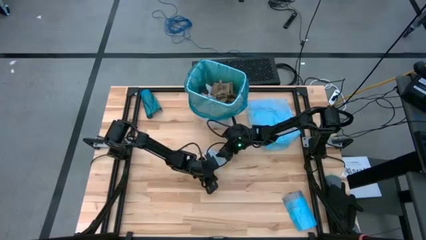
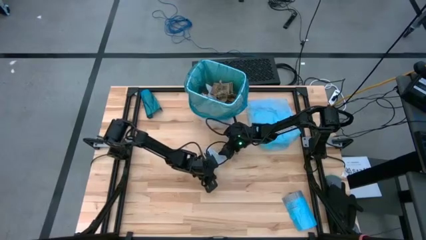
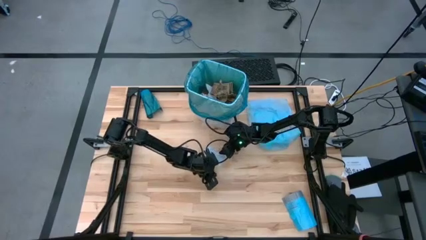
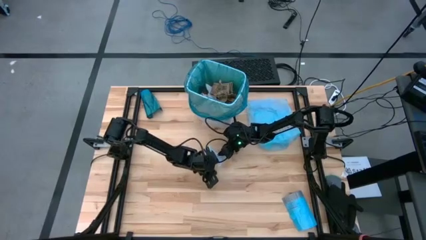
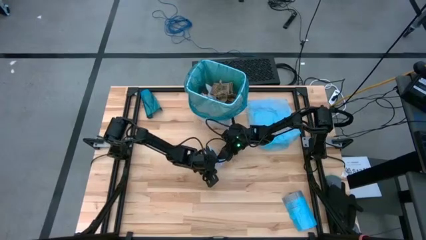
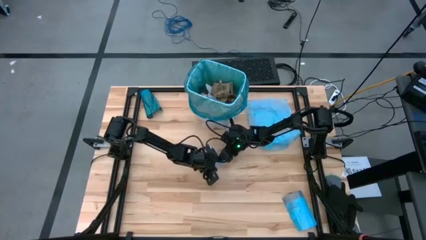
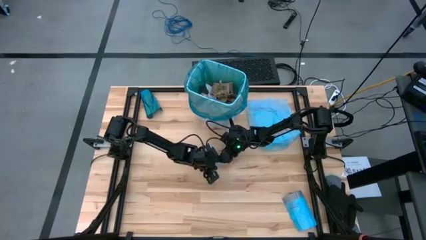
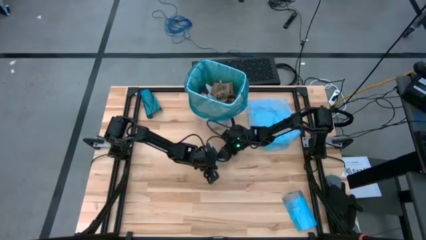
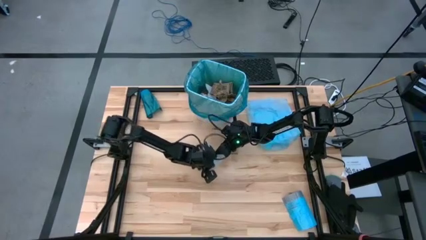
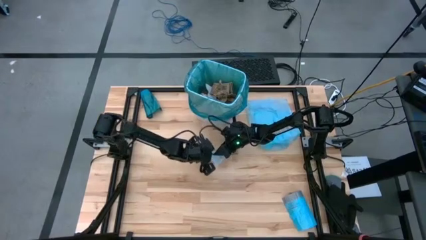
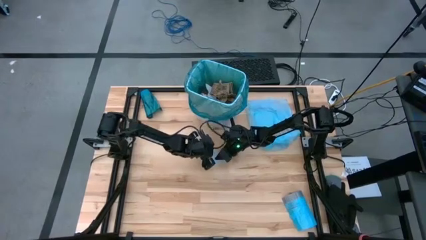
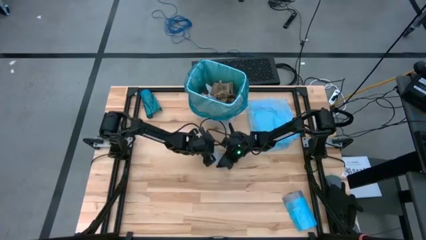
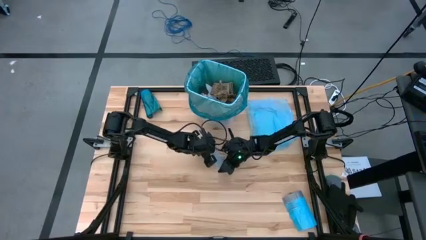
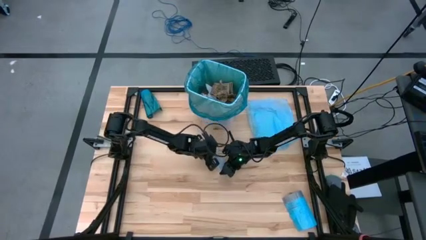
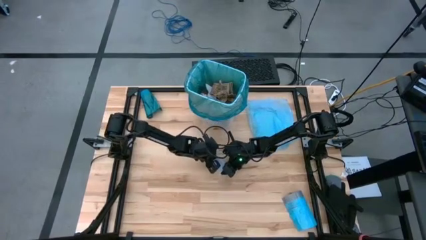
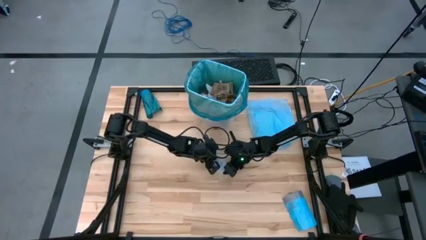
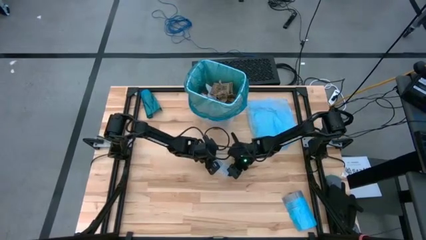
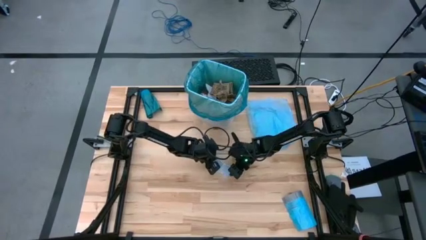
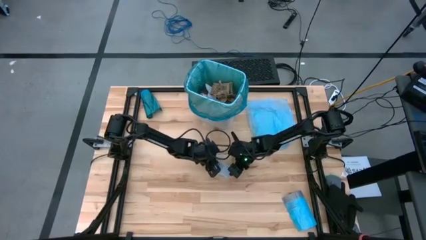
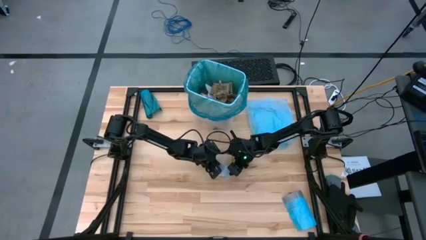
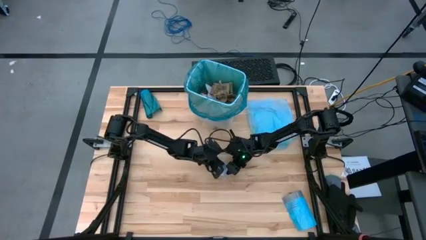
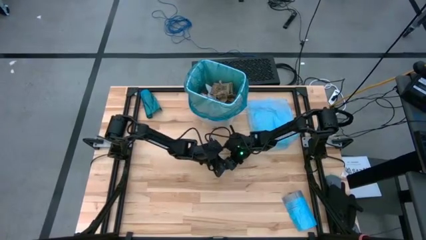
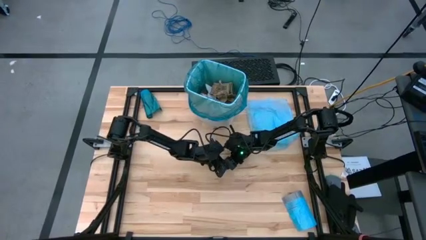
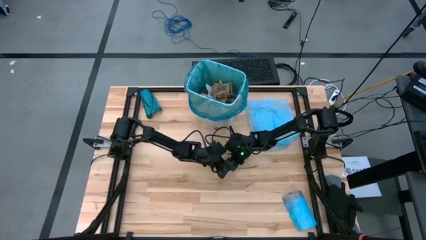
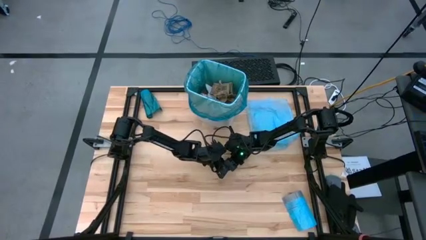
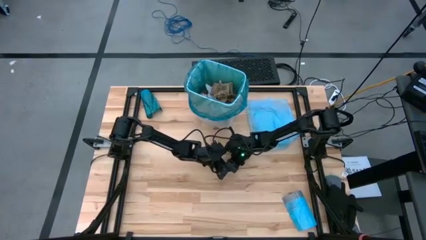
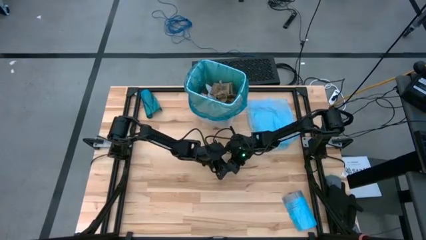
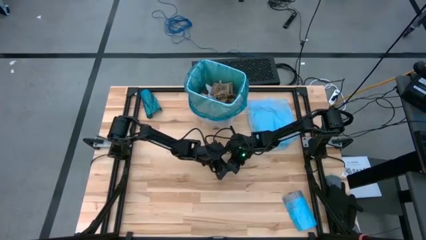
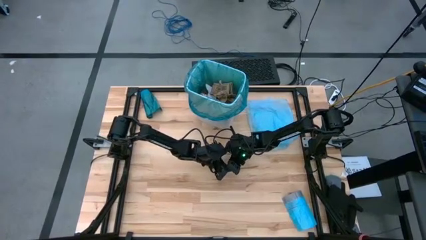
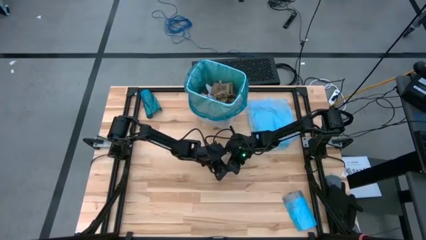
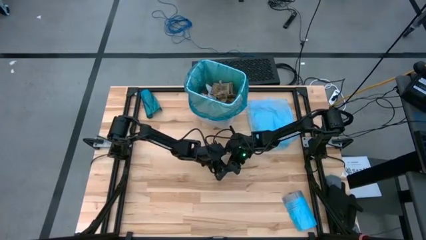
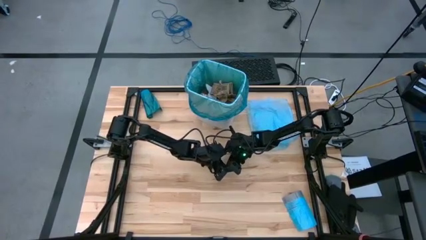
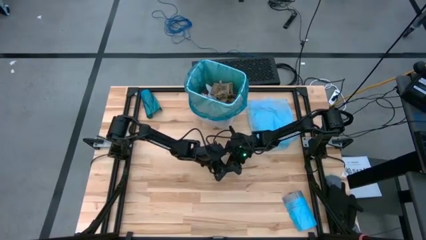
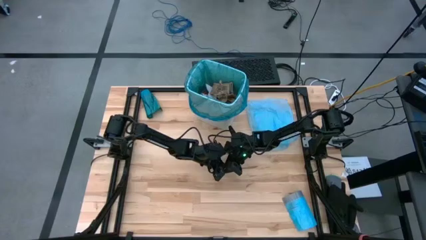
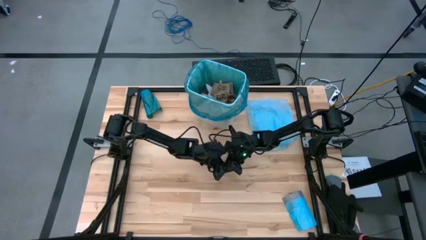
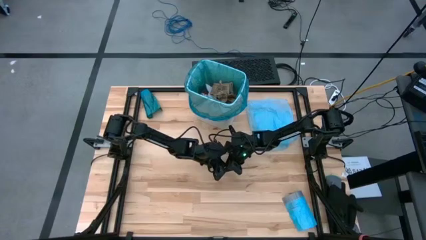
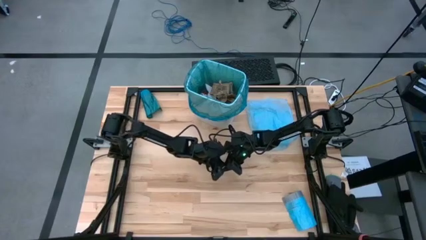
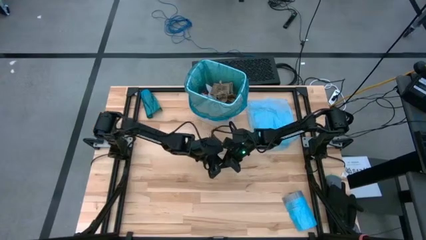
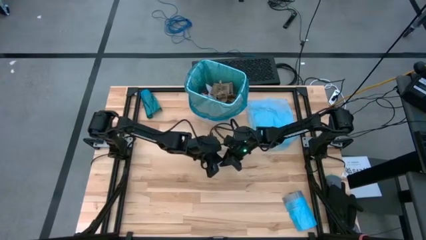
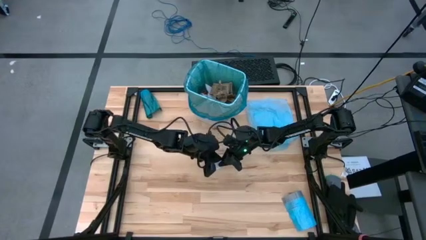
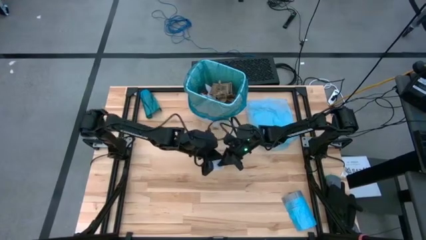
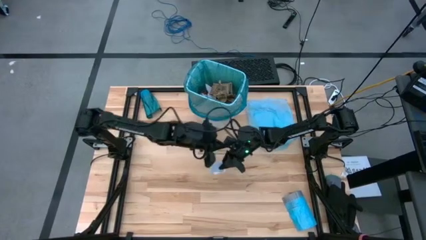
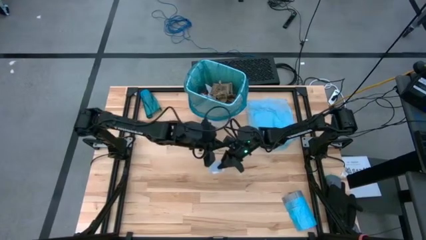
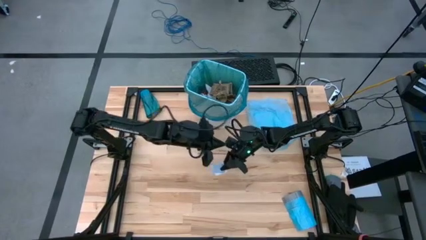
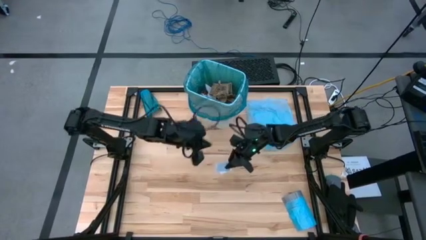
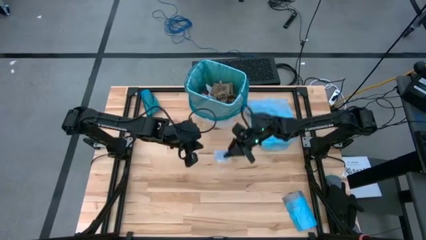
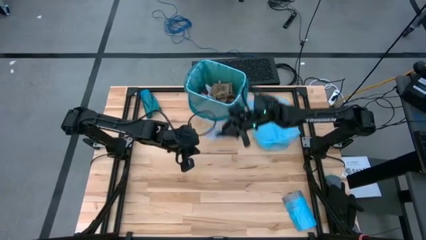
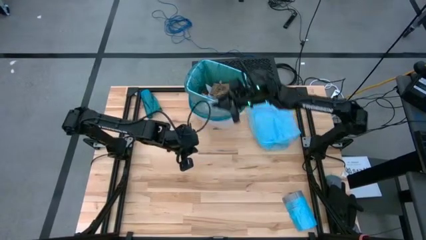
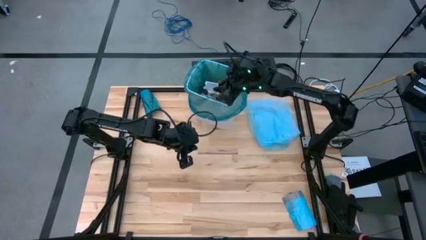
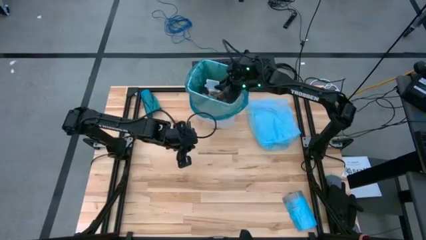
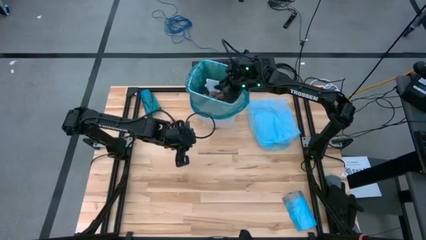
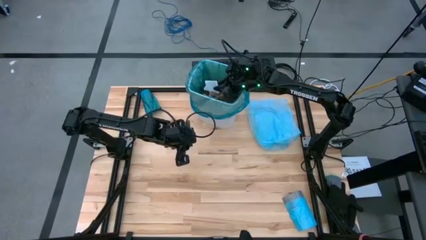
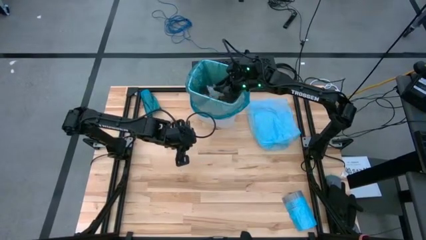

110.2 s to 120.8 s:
Task: place trash/remove bag and relplace
Put the white paper into the blue trash bag inside the white trash bin

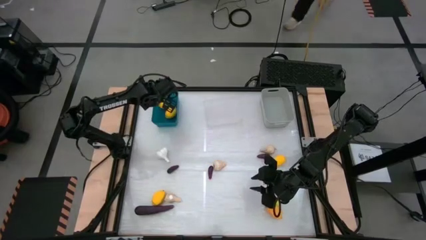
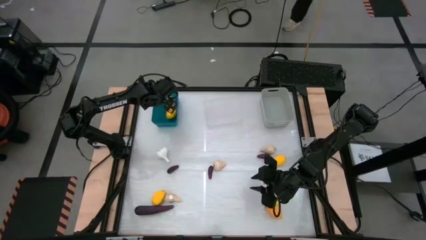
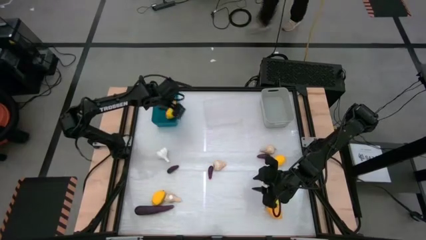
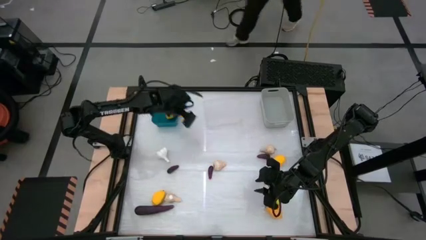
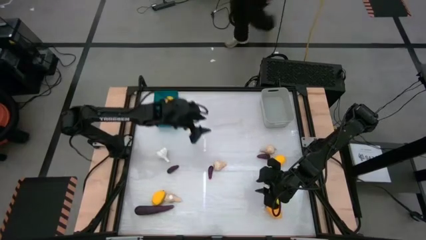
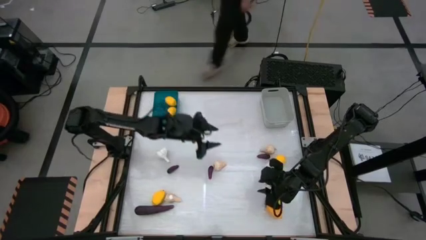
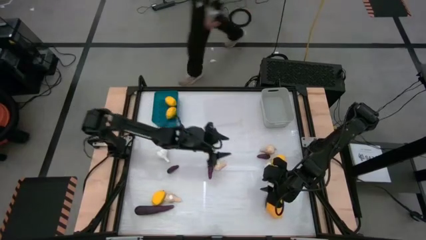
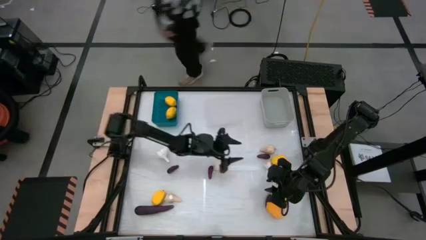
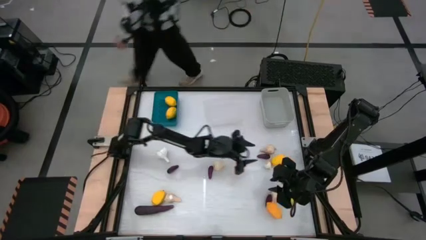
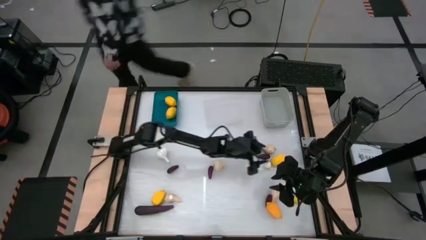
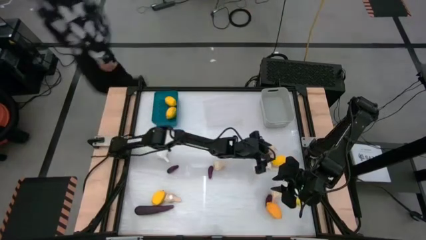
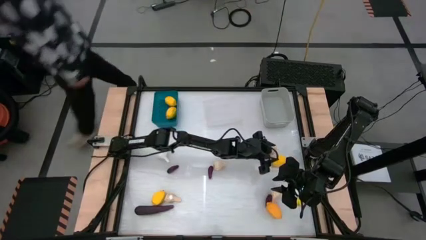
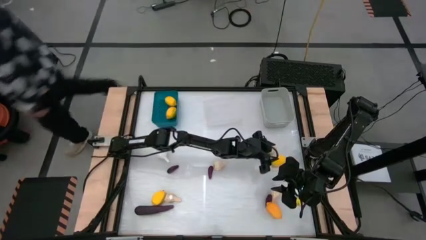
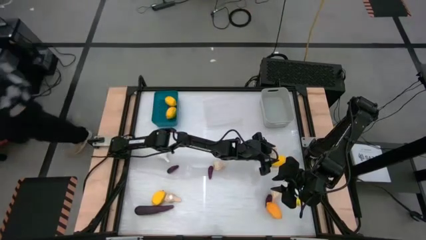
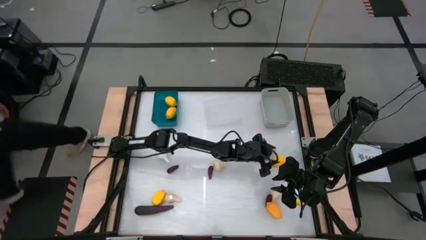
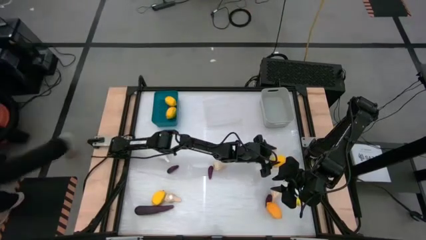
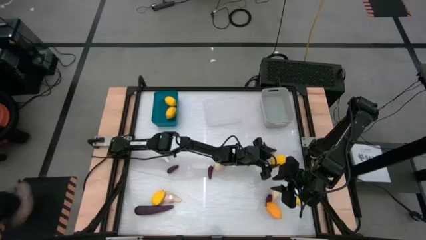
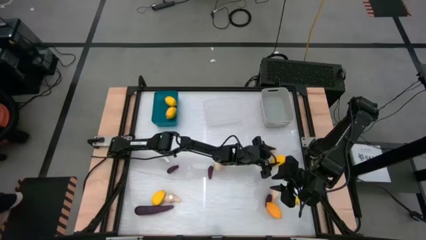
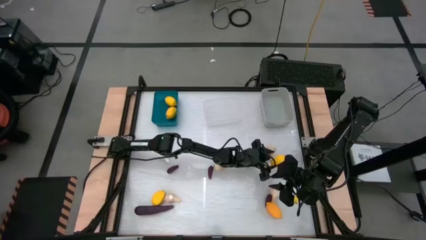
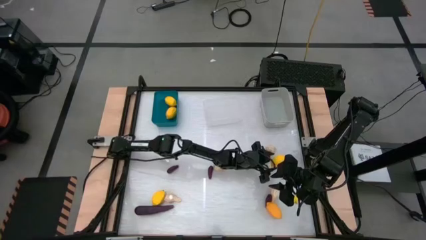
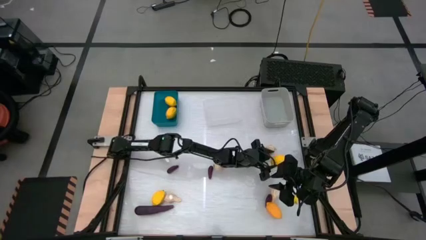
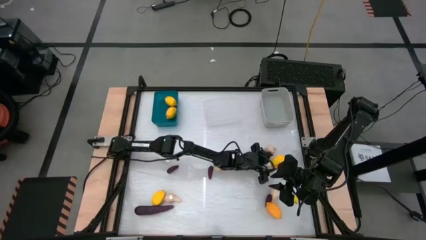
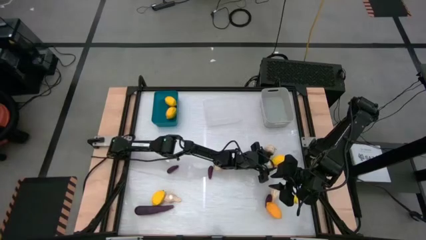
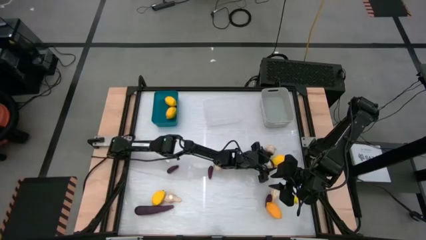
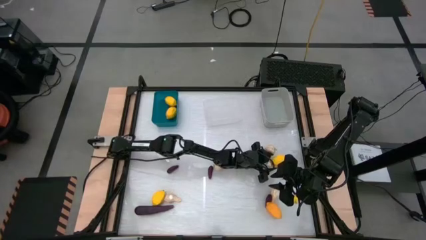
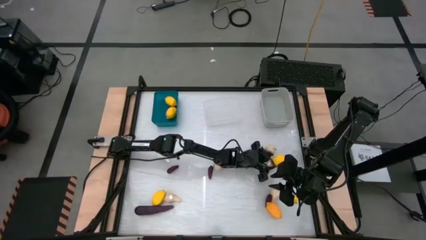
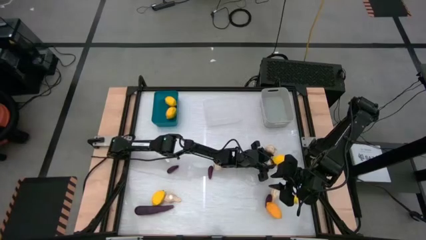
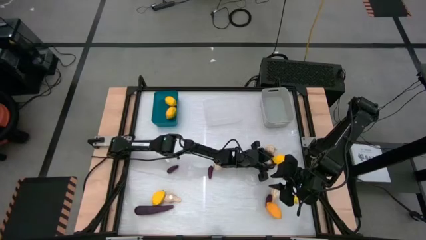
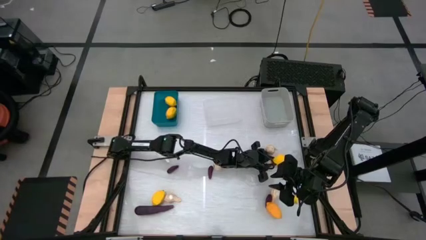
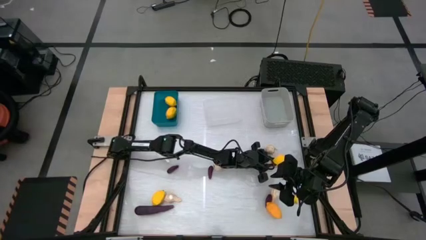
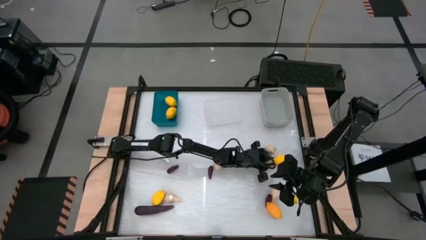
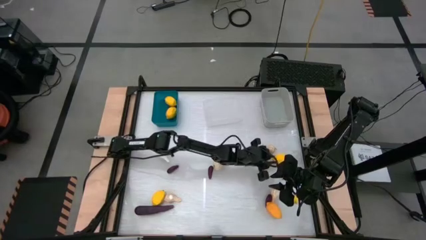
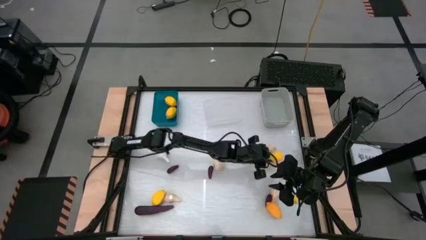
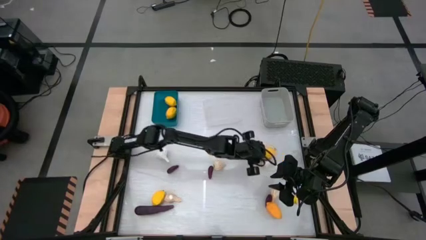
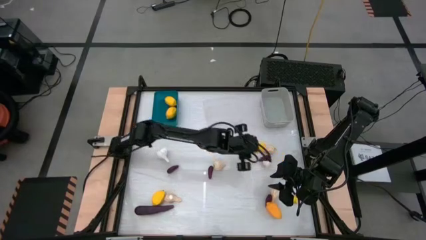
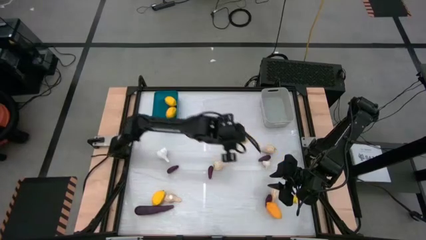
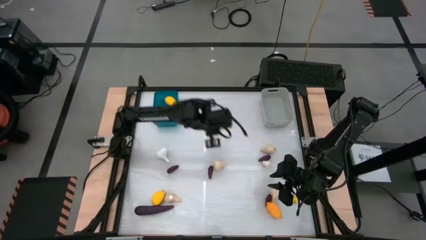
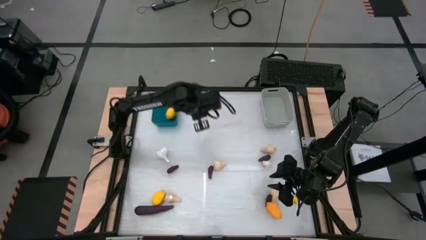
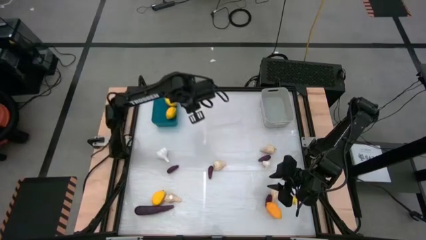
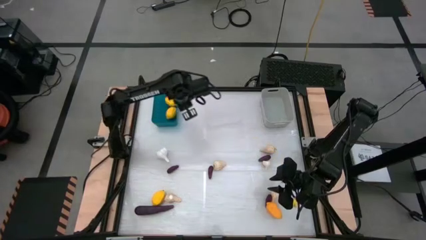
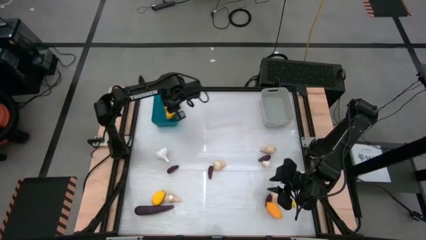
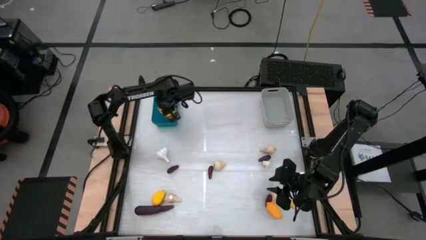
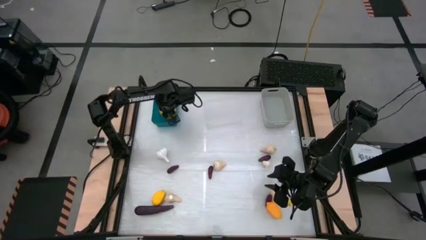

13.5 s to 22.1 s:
Task: Sort produce into baskets
Put the lemon into the blue bin
